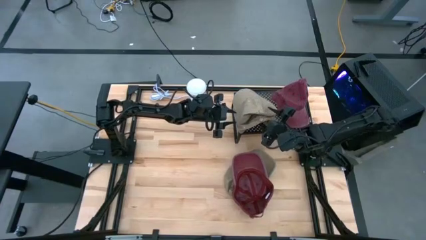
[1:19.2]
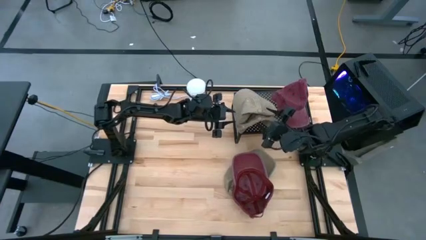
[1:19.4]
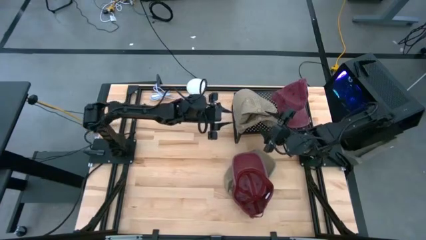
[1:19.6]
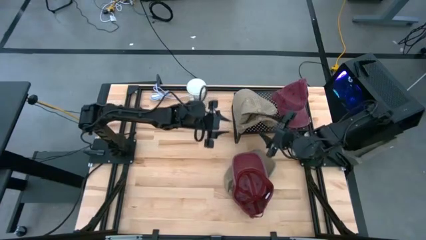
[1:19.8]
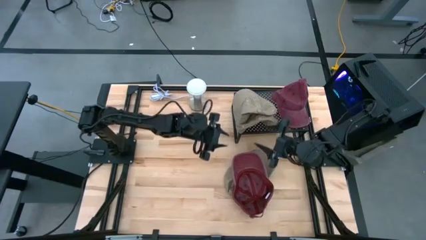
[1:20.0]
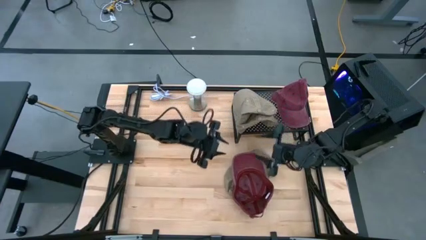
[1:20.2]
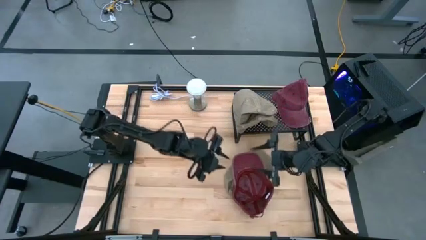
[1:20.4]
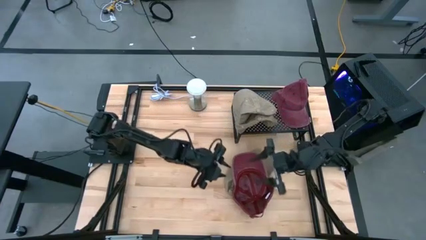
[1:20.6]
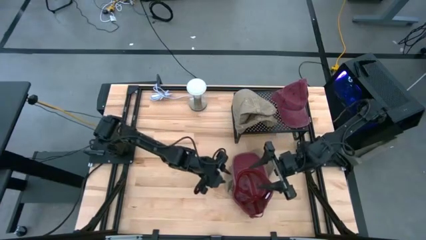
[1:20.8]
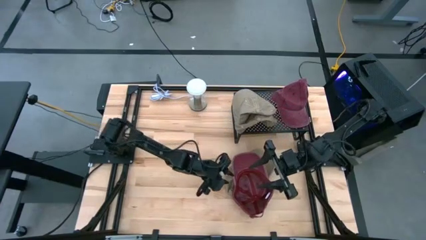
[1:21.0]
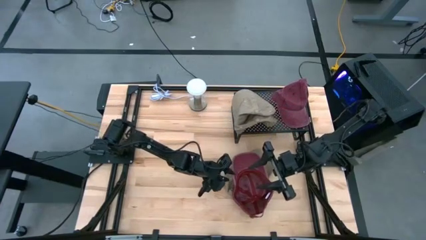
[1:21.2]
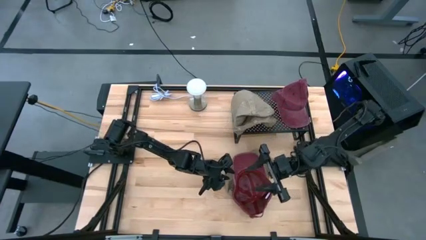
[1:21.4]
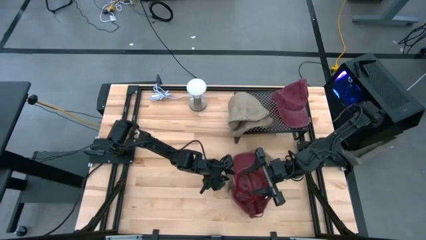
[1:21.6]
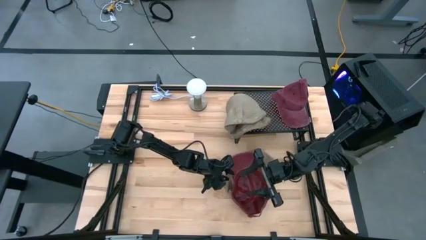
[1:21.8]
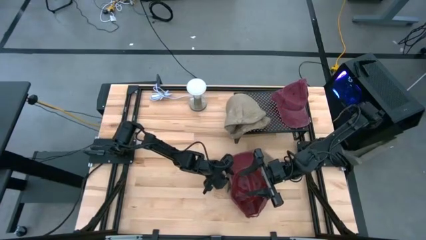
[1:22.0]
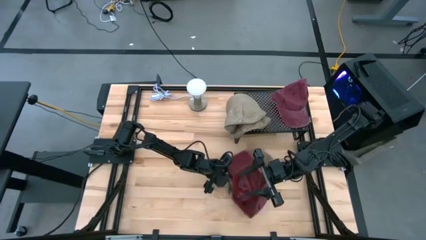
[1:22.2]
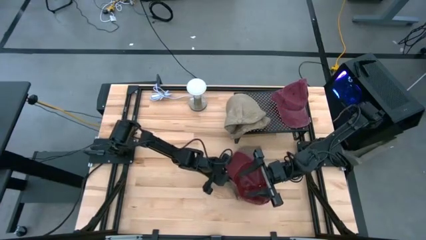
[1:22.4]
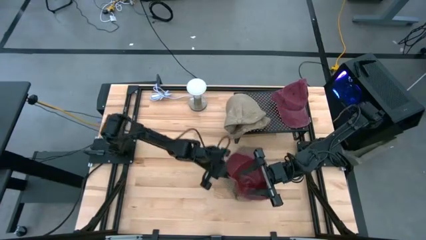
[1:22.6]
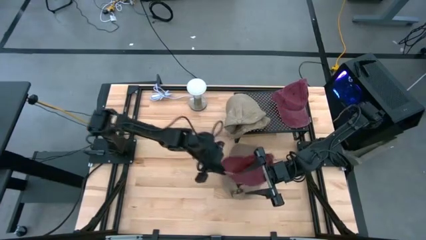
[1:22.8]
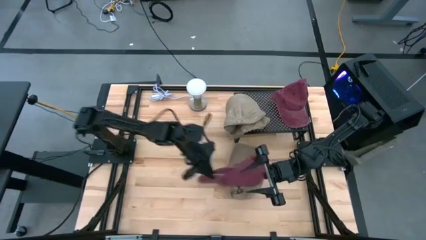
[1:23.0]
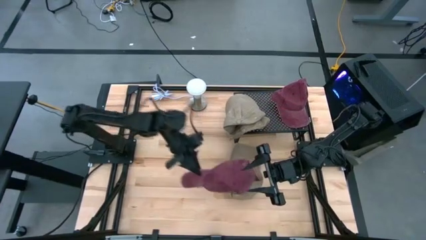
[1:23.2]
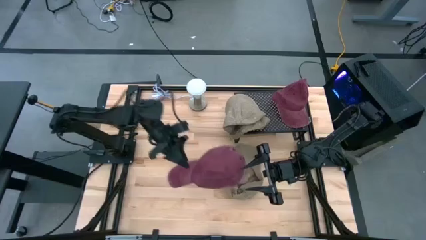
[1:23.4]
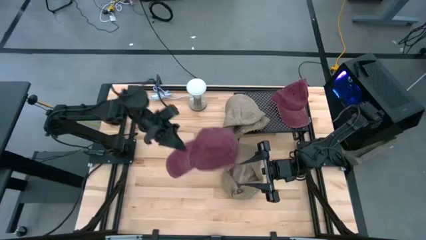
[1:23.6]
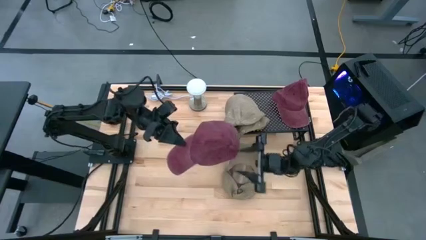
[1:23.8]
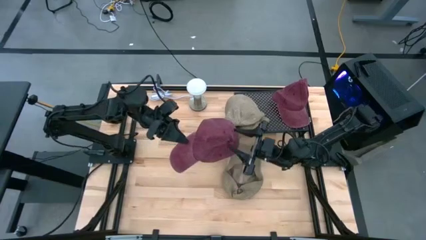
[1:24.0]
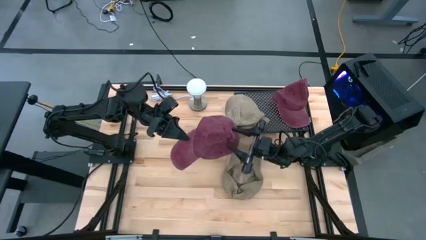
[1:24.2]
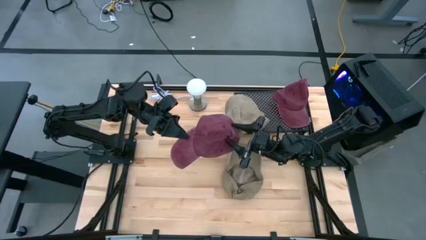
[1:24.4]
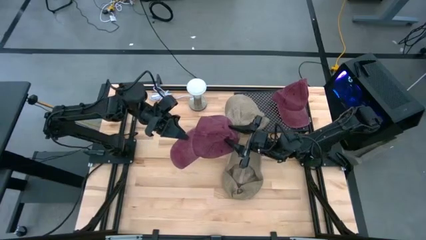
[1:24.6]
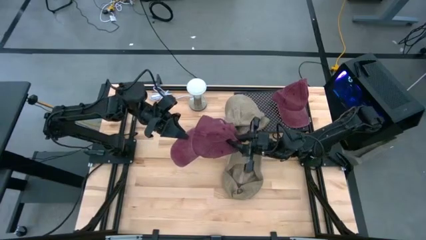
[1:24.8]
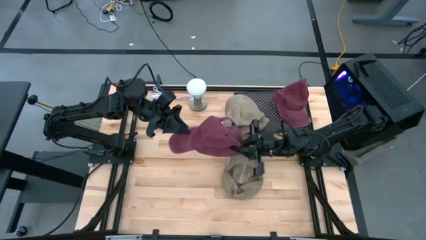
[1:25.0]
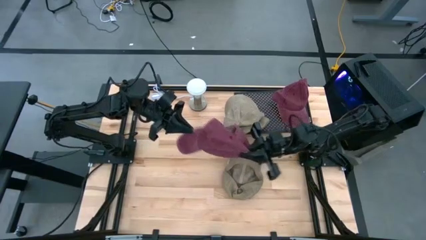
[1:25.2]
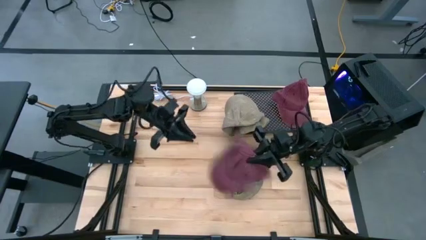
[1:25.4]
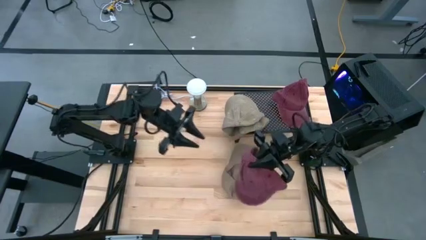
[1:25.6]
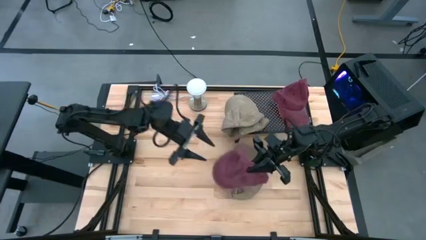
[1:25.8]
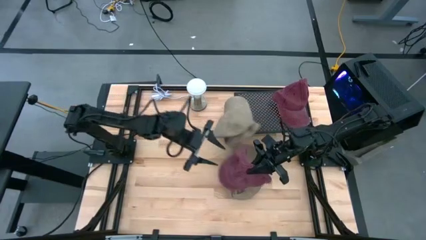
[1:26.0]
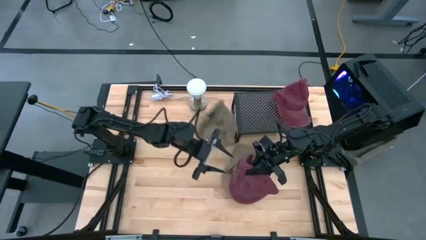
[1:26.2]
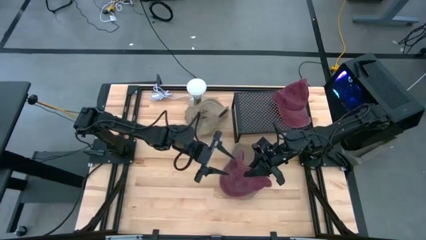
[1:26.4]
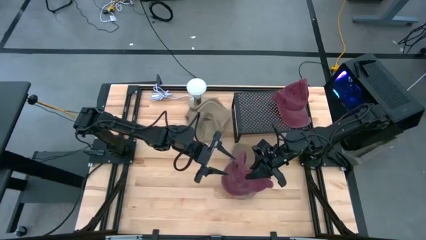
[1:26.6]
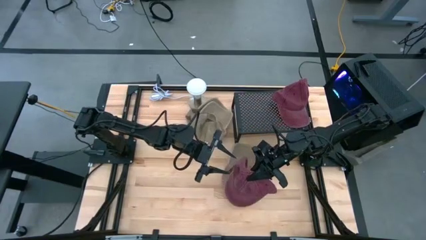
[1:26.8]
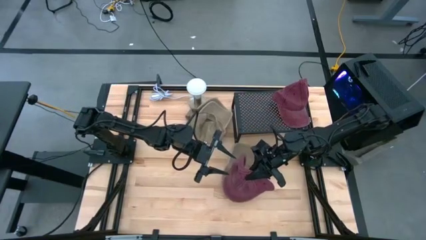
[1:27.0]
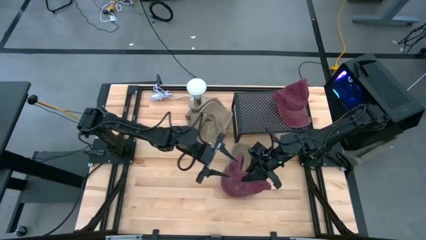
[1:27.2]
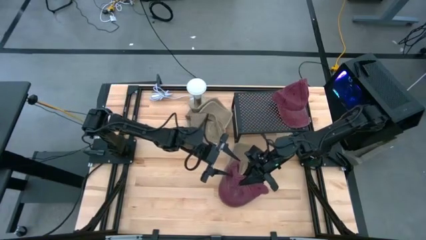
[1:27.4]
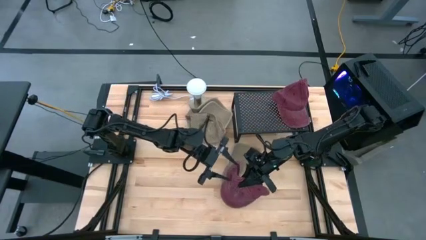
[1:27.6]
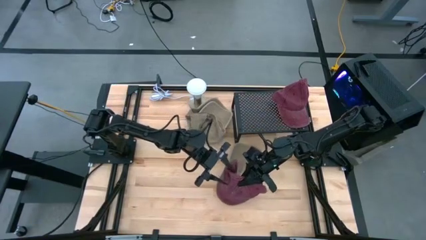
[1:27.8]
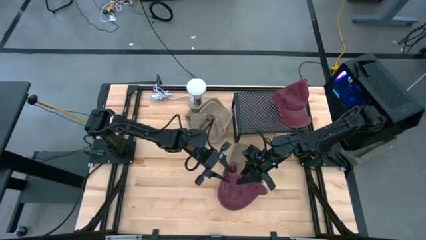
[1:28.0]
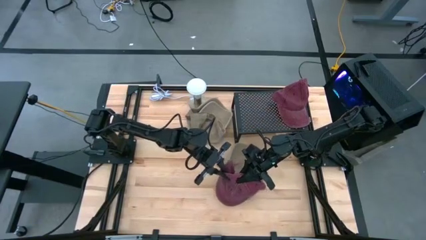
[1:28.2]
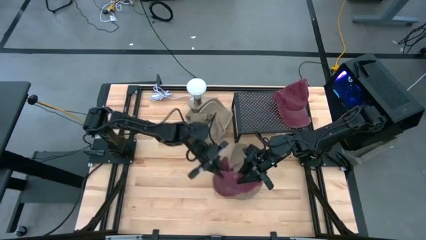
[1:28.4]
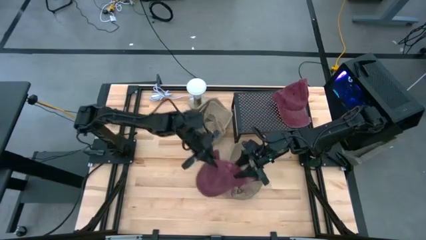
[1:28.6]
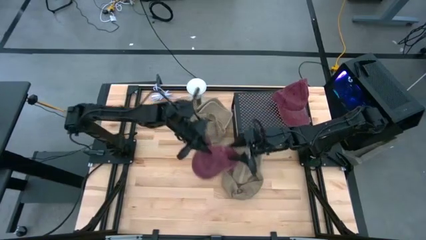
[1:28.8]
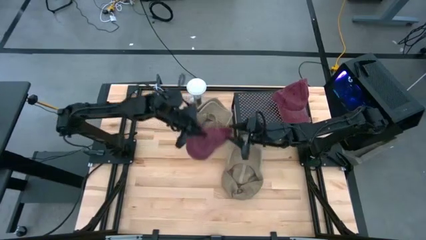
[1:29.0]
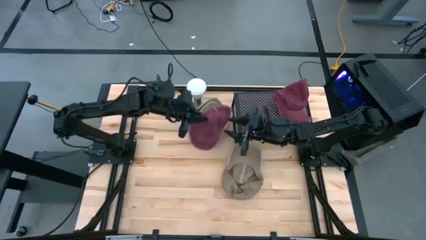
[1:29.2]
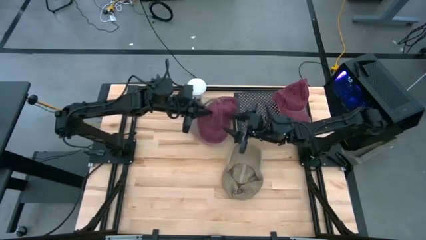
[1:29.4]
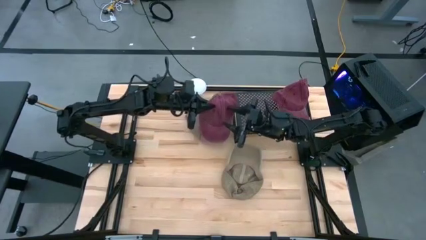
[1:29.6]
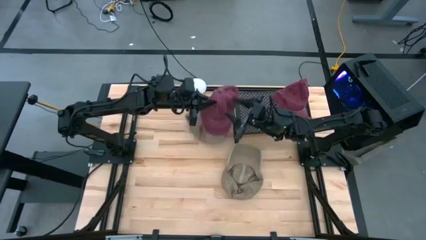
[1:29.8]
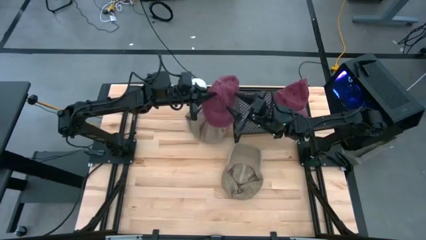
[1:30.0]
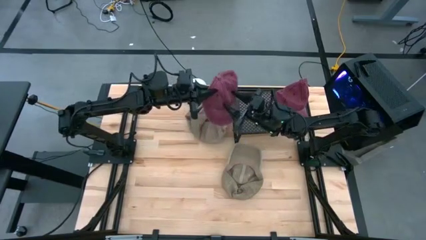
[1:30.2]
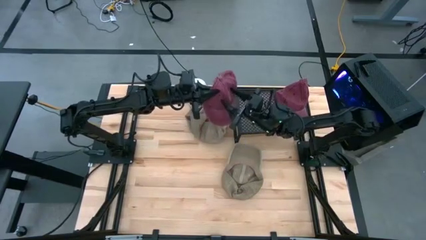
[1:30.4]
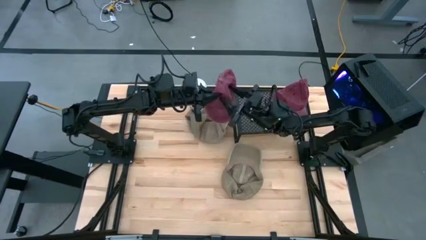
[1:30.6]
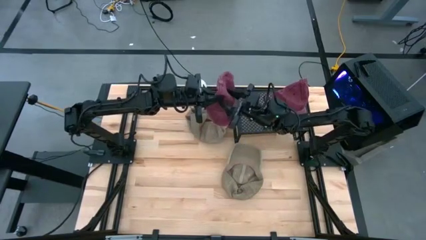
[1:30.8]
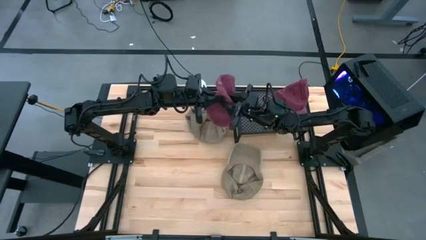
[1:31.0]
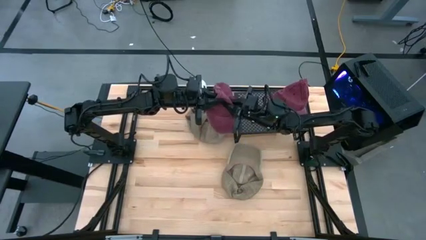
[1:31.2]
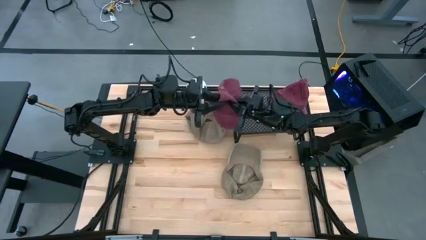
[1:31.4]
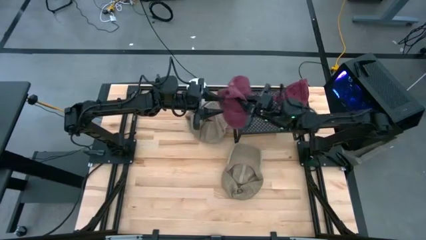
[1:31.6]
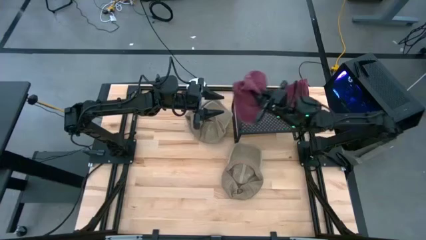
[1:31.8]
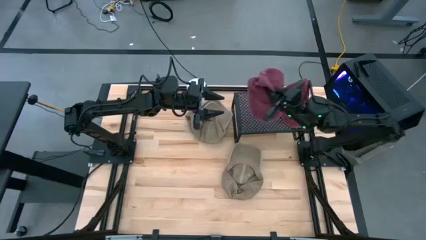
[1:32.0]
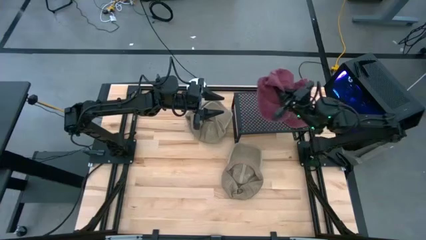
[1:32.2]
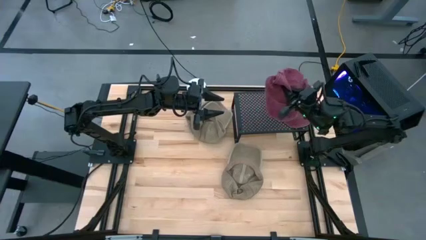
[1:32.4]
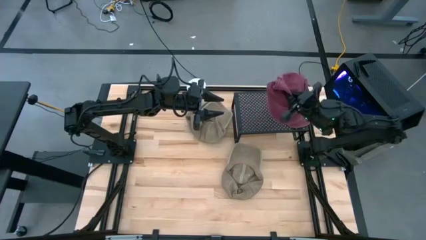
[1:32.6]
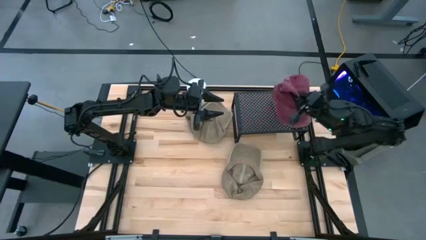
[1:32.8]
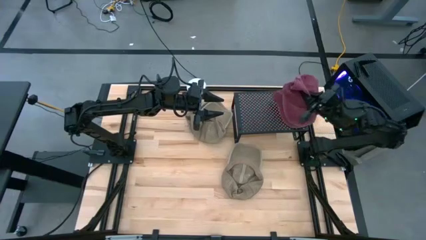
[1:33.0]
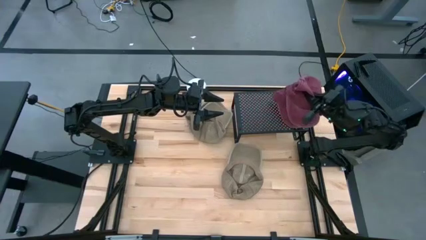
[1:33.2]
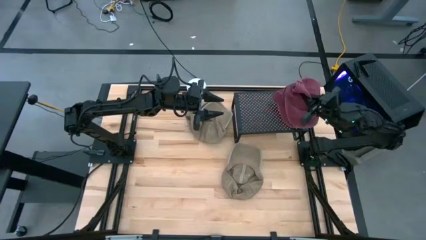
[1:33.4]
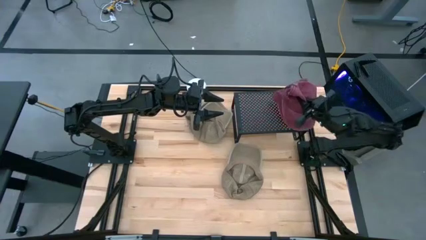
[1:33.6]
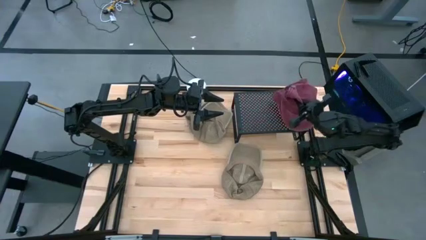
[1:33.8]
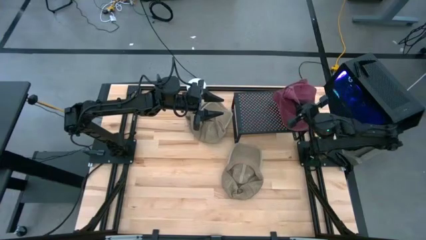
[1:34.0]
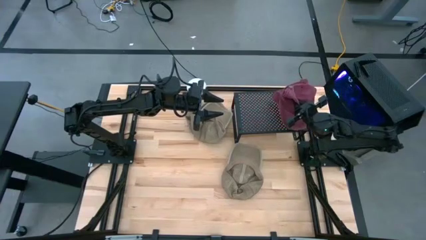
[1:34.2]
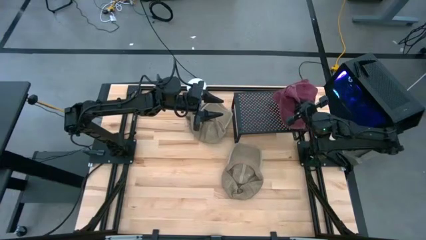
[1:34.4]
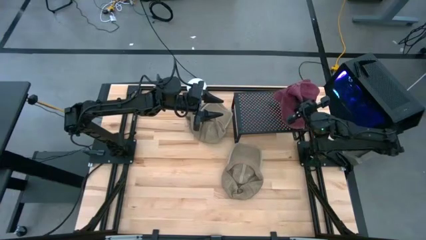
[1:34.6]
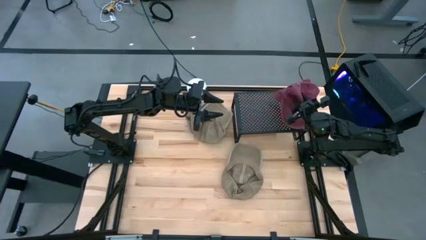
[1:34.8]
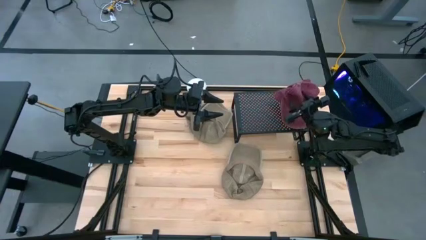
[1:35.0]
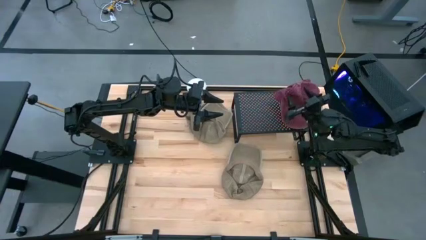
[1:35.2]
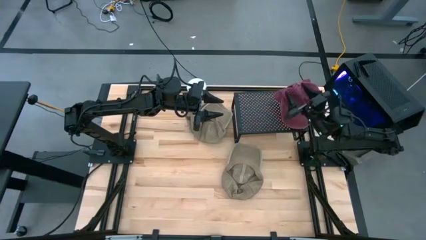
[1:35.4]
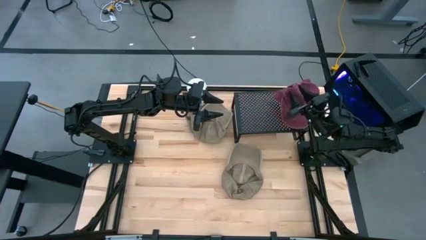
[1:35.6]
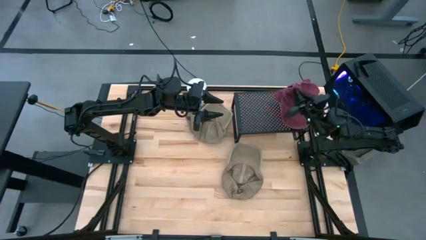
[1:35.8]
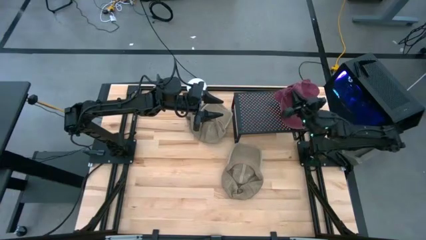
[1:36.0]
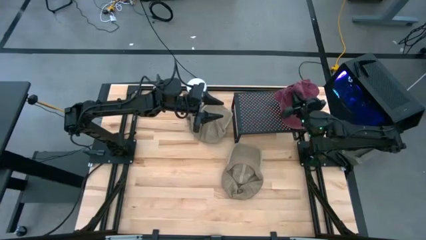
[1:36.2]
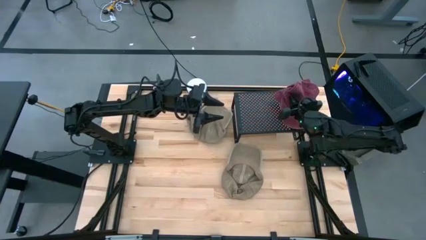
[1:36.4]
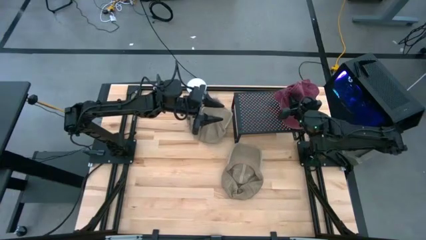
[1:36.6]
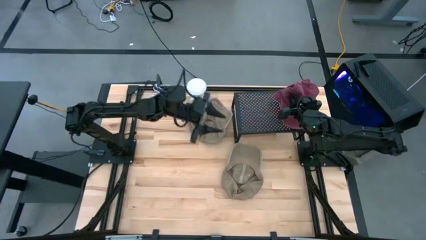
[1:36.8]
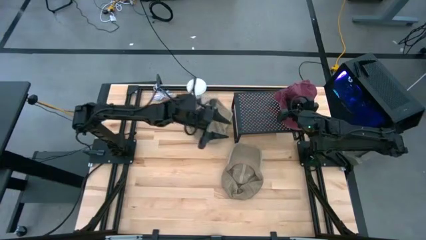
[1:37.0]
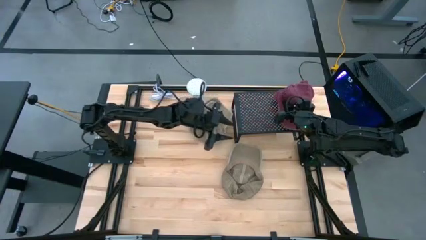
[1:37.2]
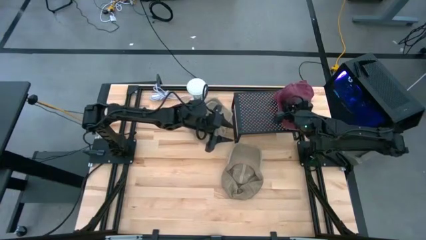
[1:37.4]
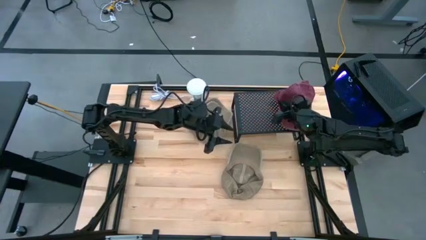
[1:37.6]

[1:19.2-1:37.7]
Task: Pick & Place hat
Stack the red hat on the red hat on the black shelf
